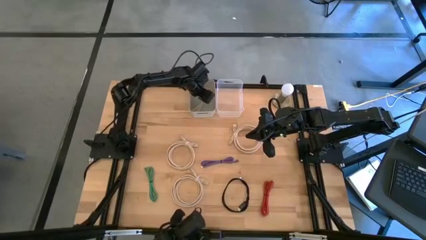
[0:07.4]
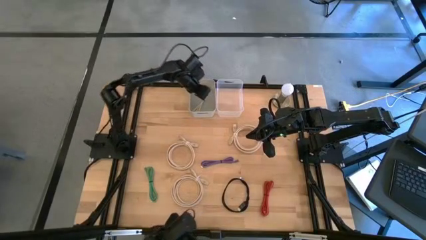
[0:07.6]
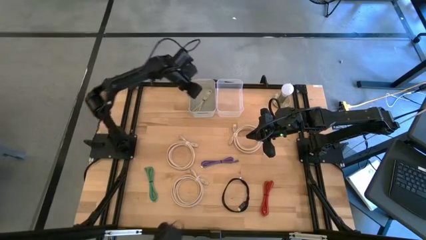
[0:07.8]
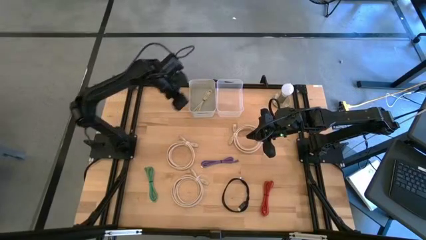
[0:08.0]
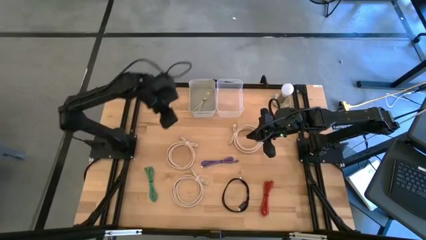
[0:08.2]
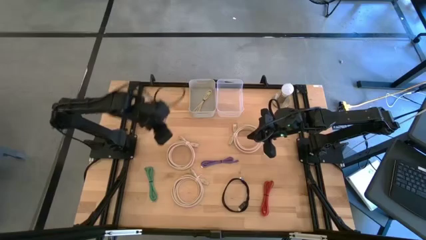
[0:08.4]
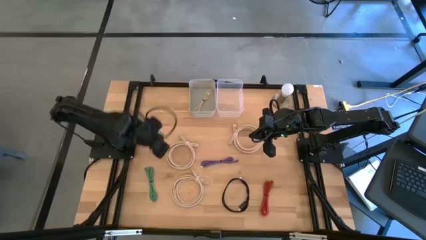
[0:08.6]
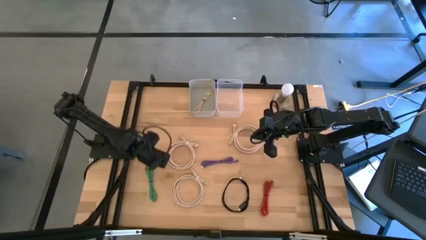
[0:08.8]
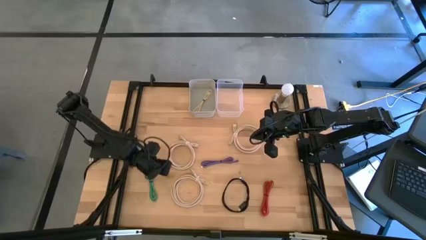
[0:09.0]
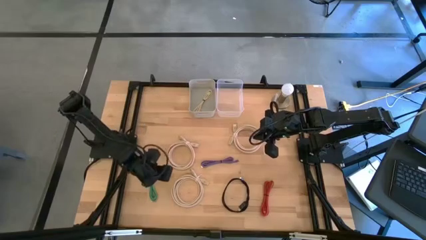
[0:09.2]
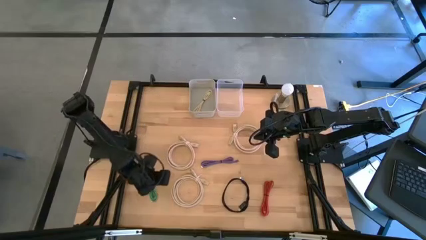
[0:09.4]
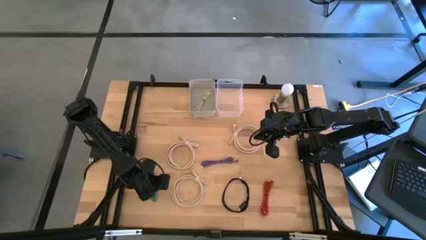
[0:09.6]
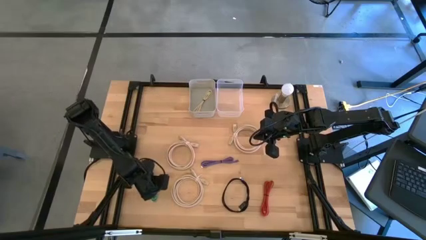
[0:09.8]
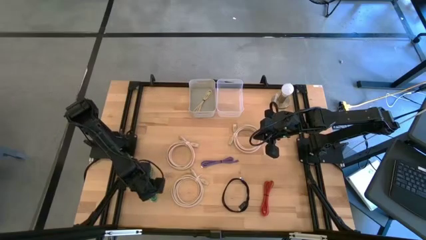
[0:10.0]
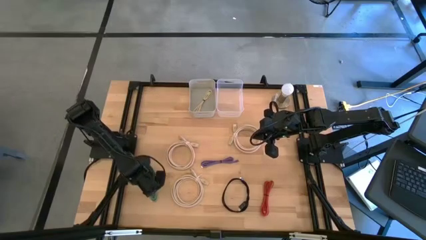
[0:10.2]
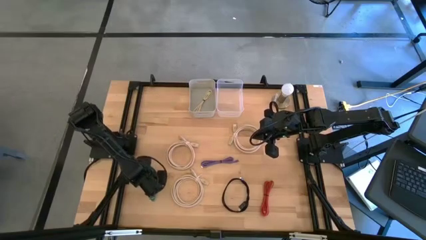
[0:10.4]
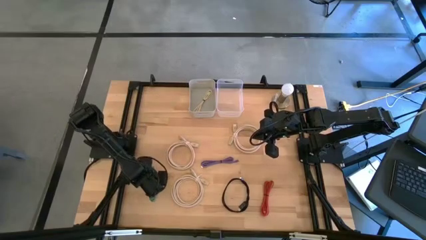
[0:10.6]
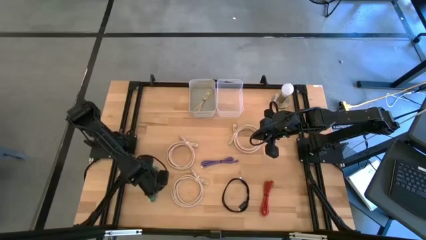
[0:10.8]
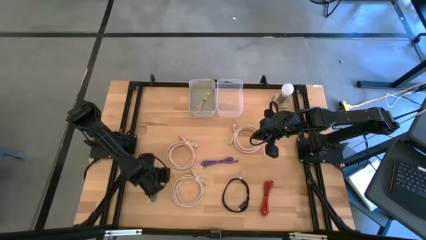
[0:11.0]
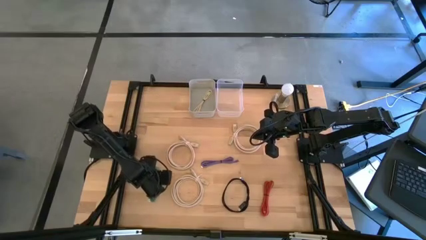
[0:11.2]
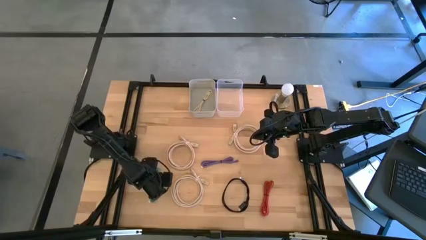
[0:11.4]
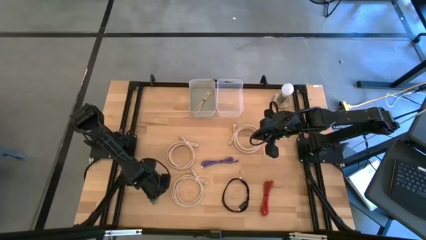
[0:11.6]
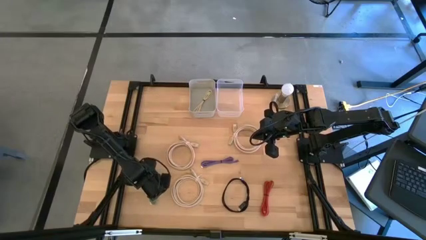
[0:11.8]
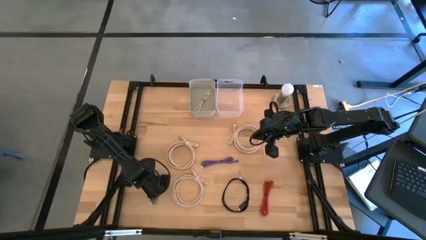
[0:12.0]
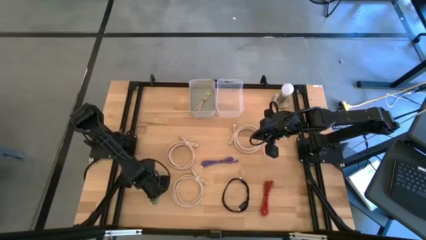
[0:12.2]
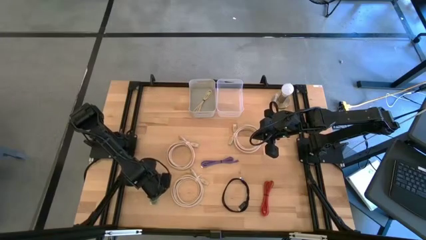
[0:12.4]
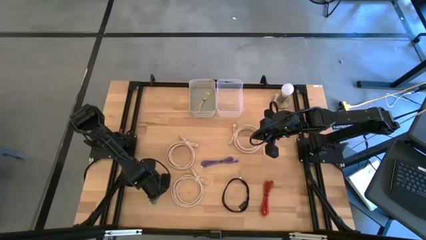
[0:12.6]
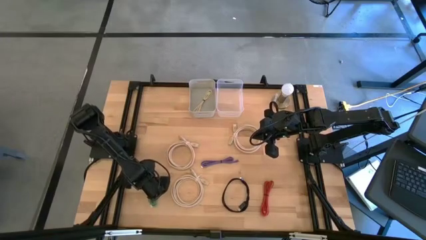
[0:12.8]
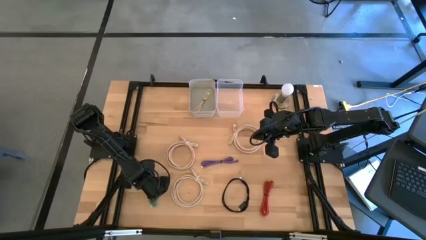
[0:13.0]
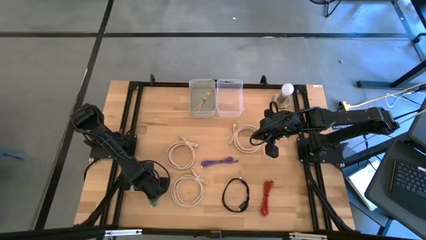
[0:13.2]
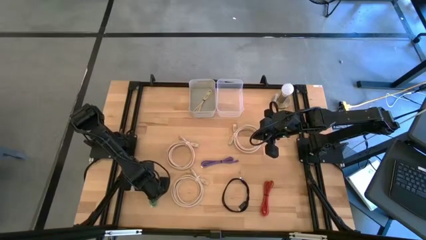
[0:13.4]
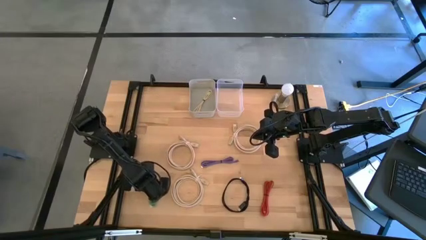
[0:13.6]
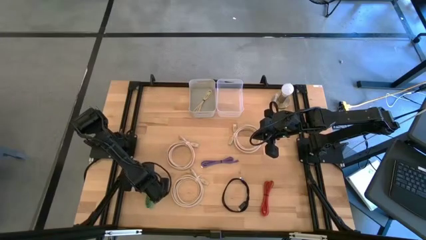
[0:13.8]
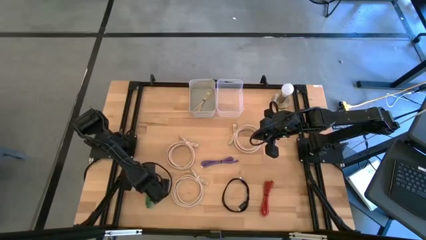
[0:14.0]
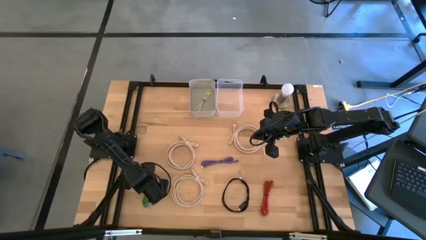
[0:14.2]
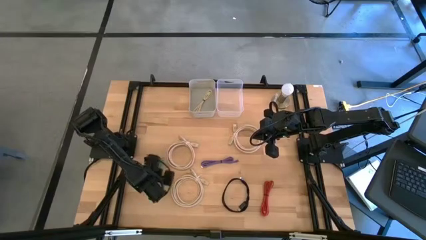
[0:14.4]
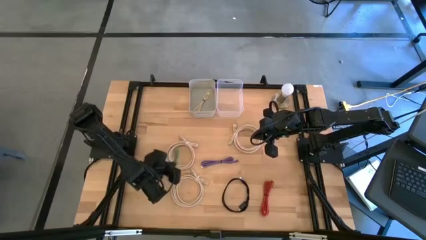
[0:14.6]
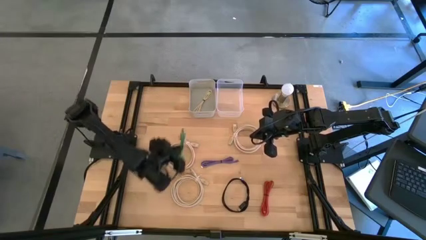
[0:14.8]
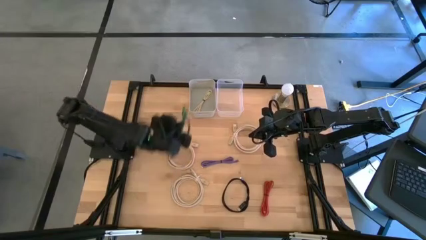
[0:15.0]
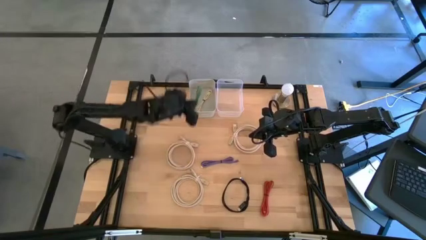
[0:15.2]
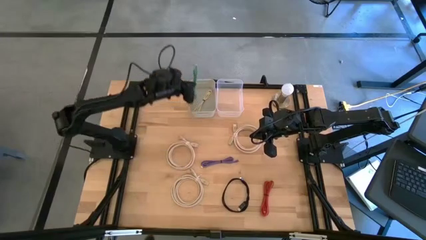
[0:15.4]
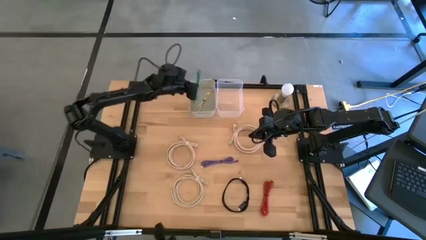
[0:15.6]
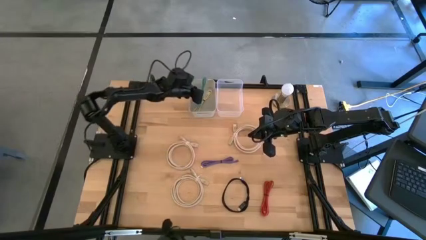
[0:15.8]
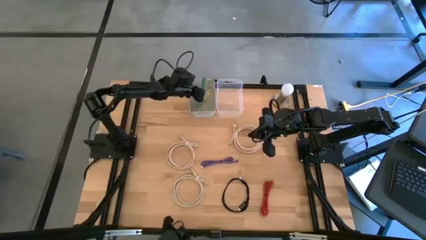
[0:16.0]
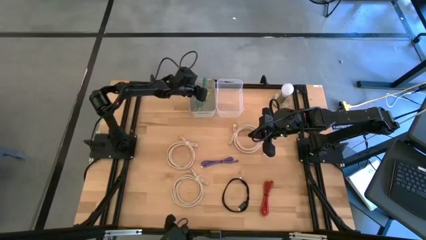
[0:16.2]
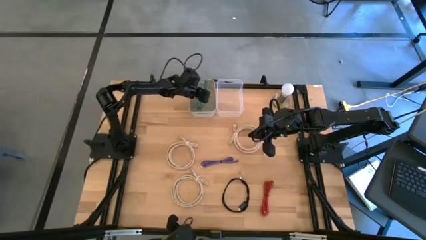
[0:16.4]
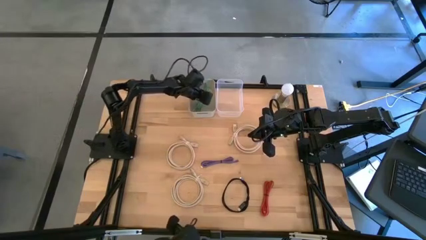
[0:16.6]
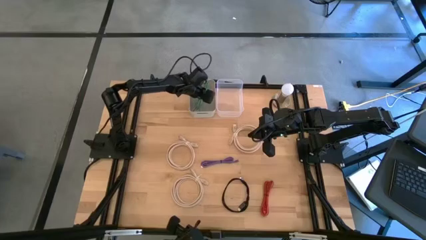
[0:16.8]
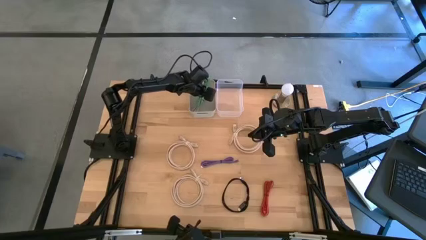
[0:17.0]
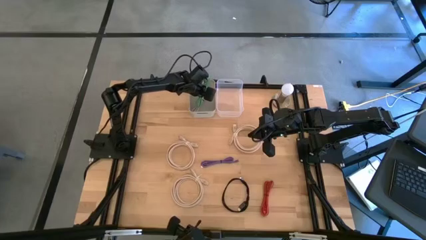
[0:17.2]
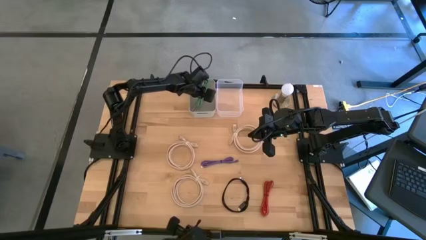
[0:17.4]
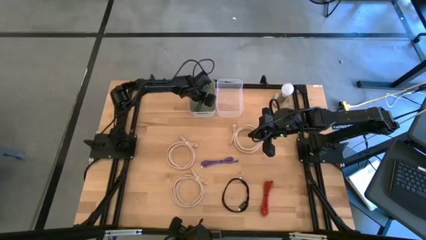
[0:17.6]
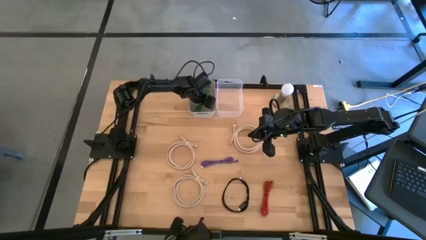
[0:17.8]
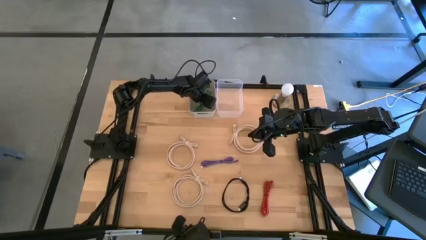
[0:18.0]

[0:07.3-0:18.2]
Task: Pick and place USB-C Cables
Put the green charger cable into the gray bin

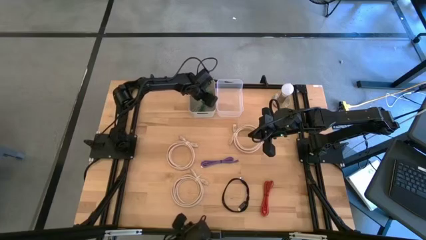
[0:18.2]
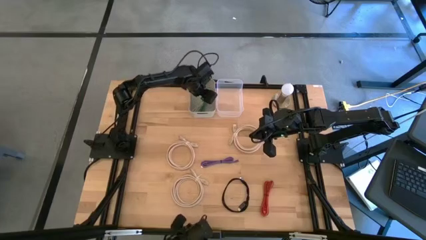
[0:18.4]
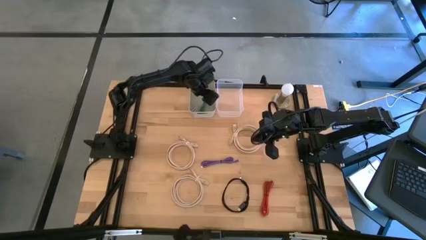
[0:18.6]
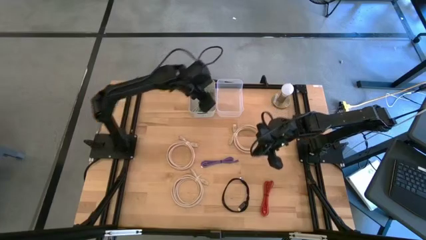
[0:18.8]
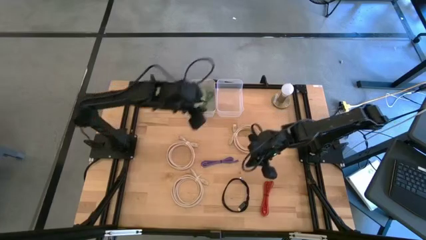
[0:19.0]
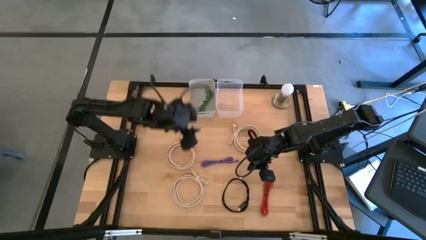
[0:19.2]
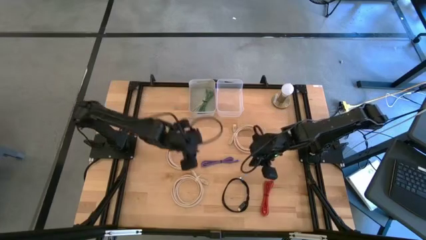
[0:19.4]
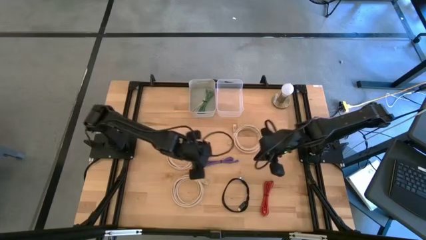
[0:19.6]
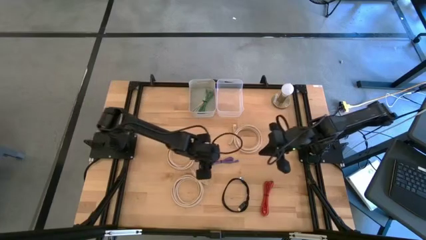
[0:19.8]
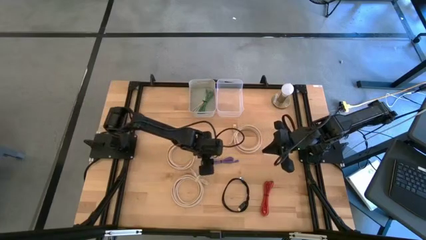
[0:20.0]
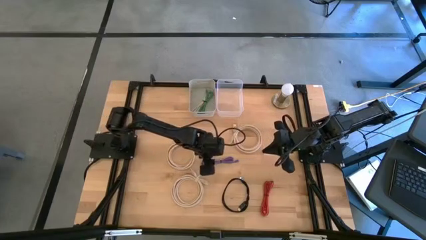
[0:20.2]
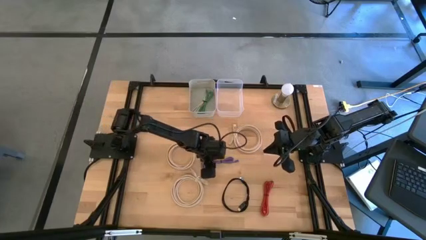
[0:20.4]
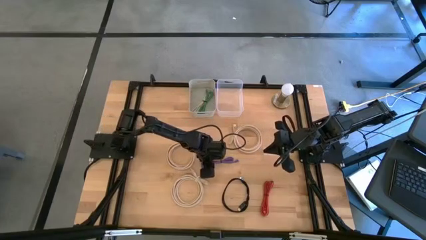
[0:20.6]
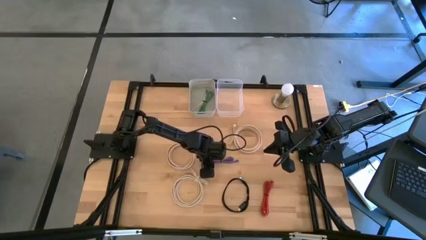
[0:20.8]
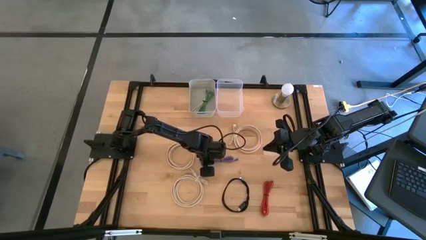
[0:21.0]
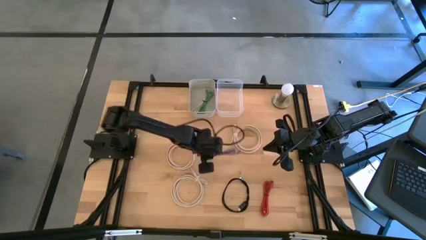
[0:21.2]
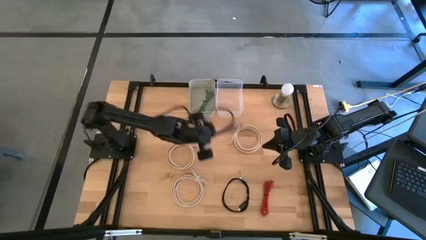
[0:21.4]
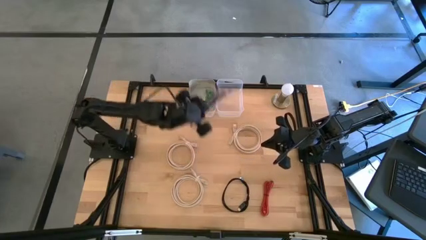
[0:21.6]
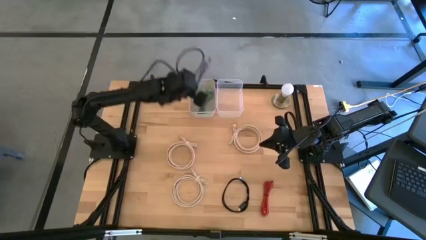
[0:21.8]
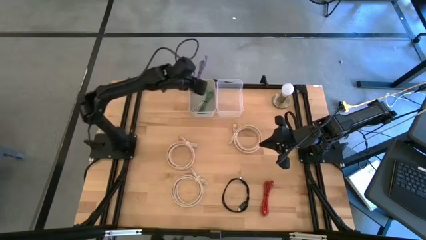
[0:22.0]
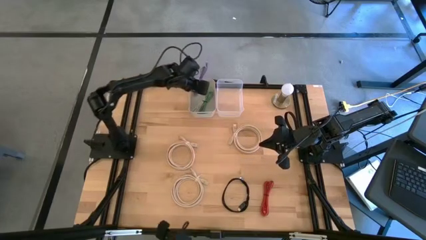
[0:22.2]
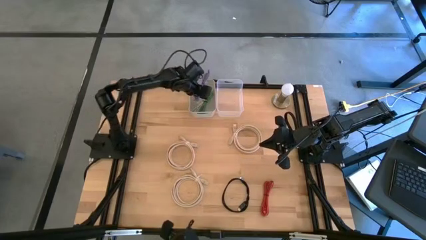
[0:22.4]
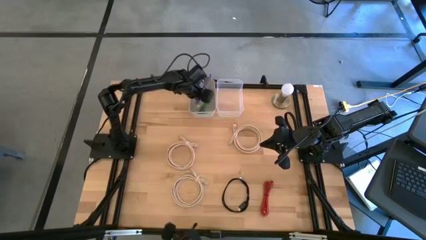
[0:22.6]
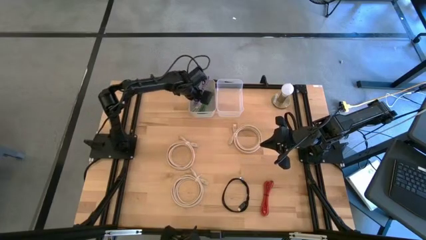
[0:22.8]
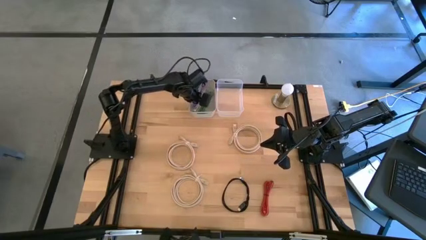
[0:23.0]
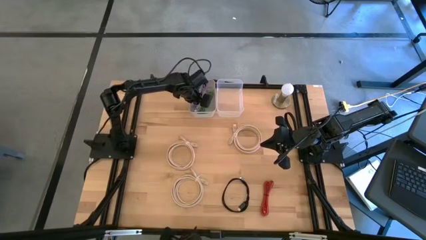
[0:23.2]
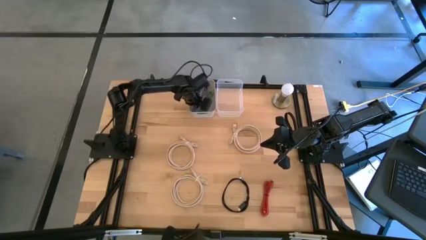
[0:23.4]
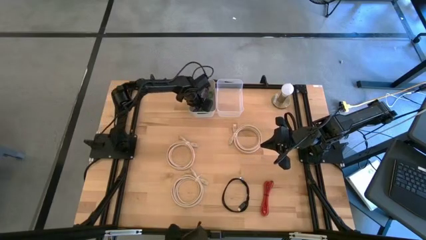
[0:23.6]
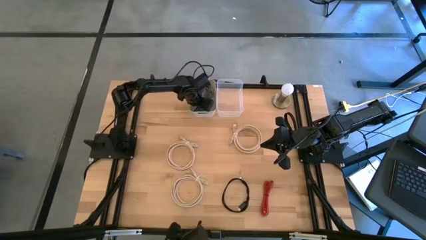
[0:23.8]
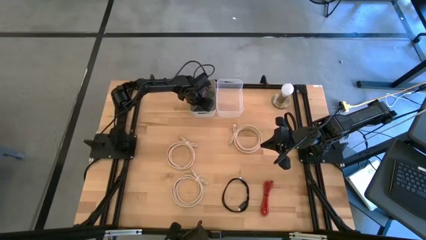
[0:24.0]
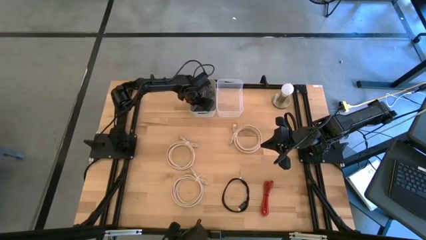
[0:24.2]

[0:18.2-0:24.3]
Put the purple charger cable into the gray bin
